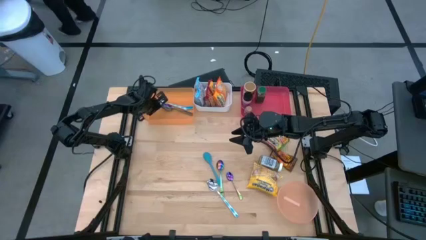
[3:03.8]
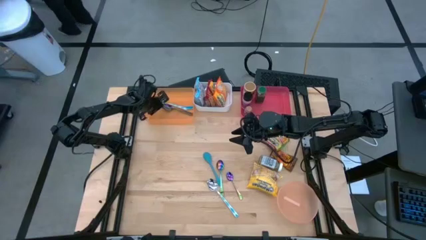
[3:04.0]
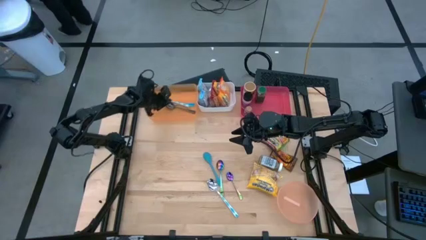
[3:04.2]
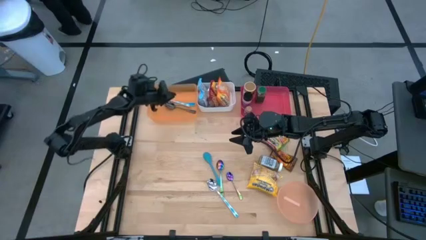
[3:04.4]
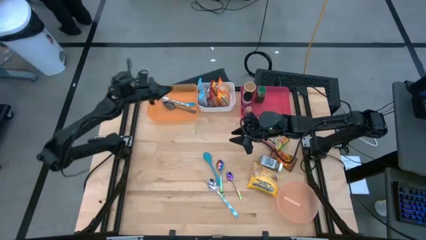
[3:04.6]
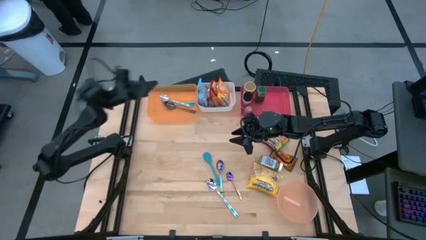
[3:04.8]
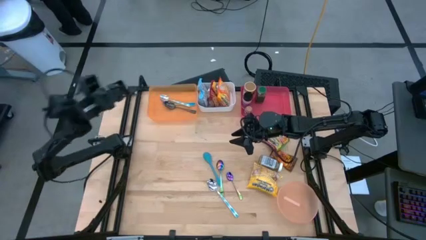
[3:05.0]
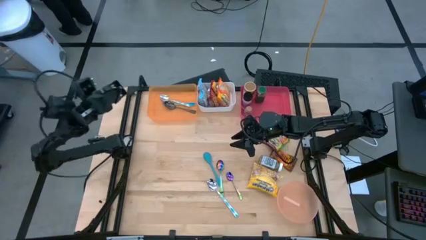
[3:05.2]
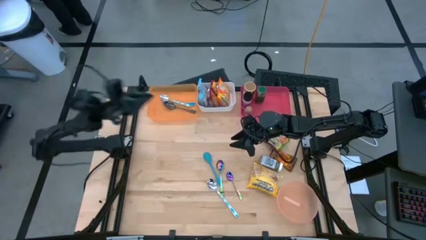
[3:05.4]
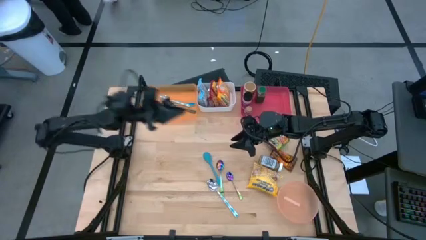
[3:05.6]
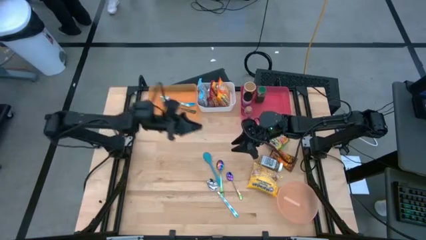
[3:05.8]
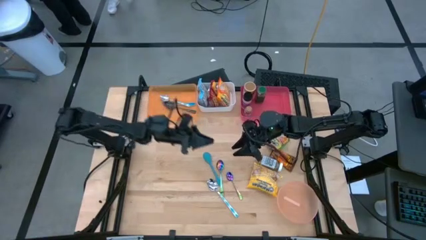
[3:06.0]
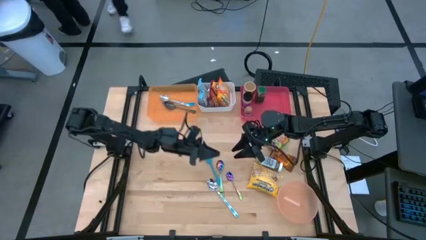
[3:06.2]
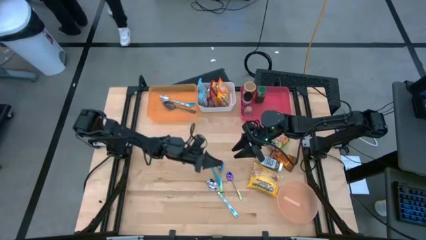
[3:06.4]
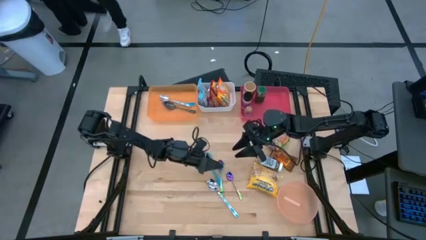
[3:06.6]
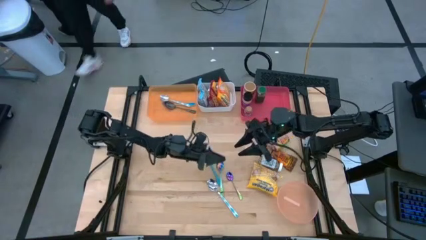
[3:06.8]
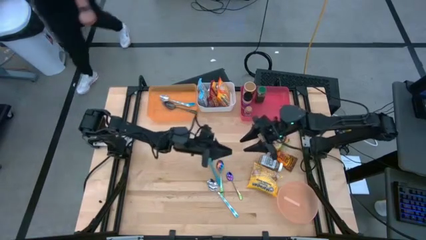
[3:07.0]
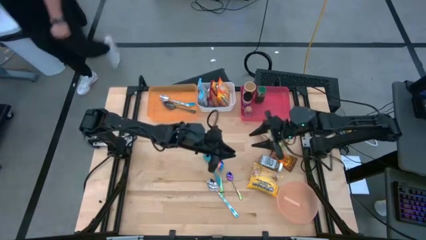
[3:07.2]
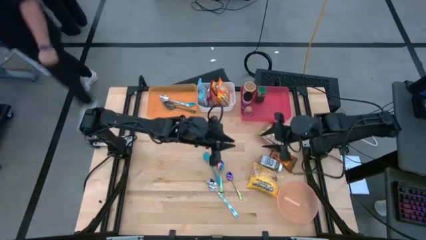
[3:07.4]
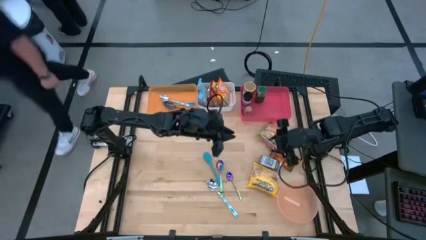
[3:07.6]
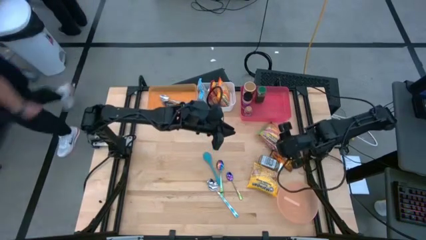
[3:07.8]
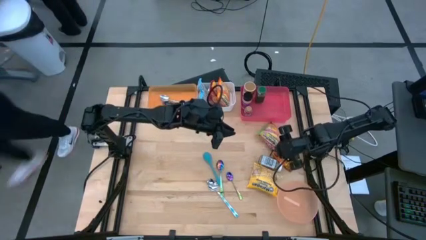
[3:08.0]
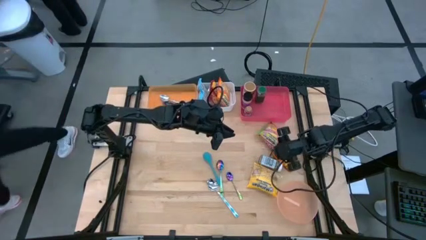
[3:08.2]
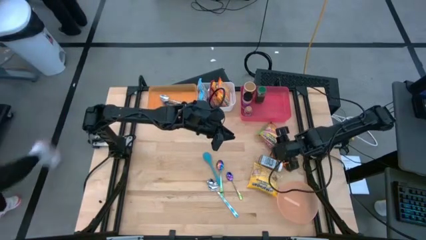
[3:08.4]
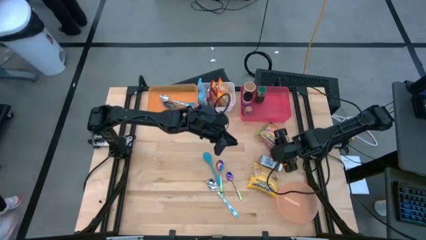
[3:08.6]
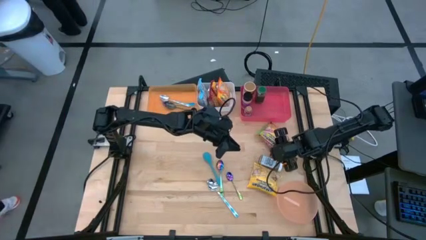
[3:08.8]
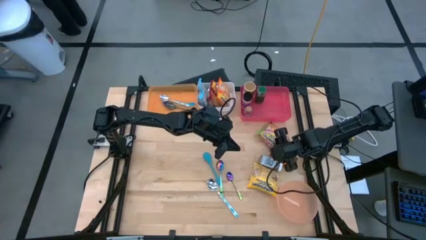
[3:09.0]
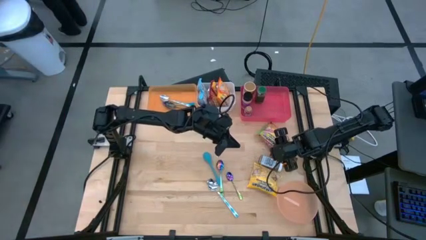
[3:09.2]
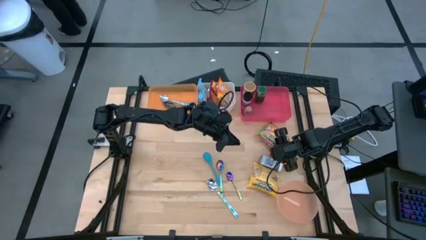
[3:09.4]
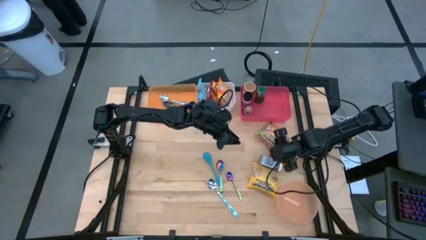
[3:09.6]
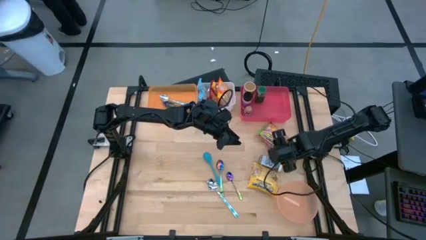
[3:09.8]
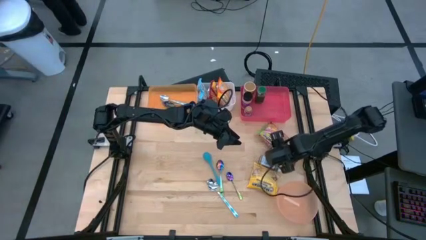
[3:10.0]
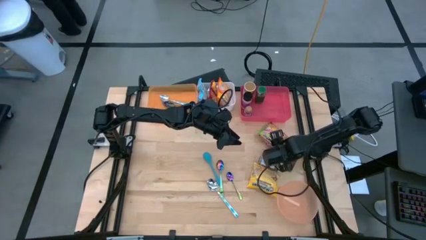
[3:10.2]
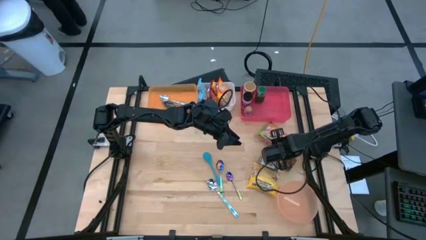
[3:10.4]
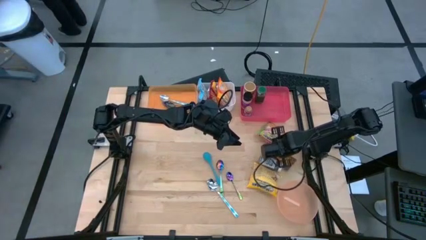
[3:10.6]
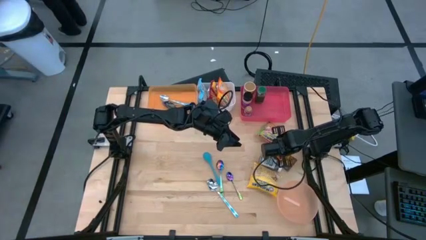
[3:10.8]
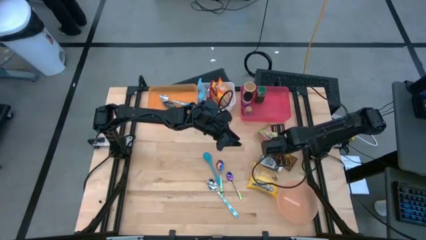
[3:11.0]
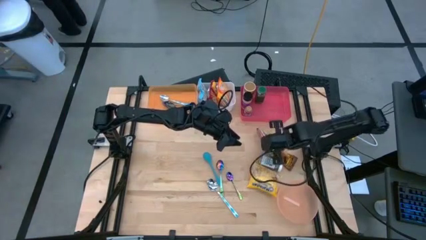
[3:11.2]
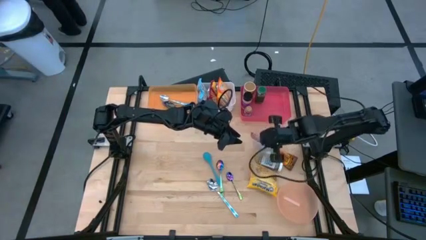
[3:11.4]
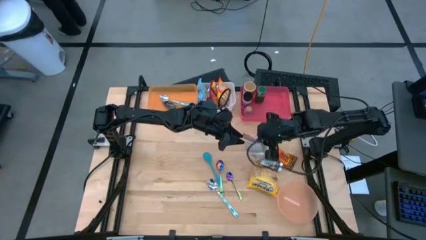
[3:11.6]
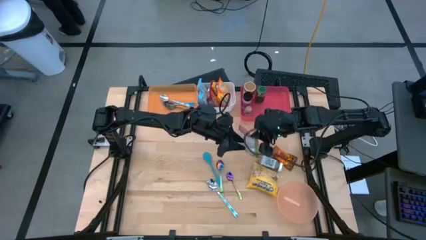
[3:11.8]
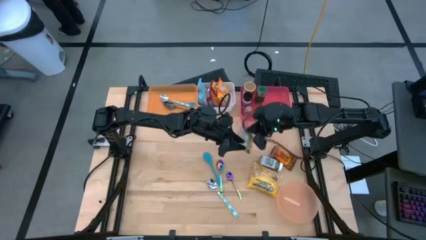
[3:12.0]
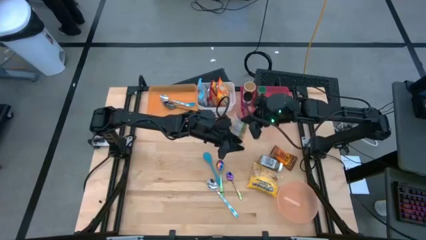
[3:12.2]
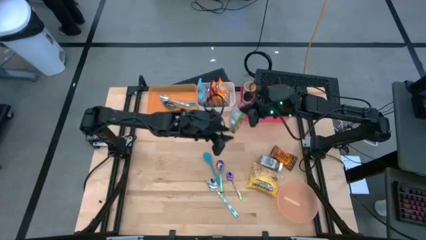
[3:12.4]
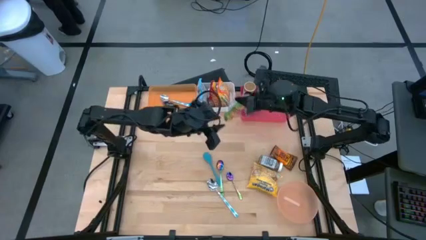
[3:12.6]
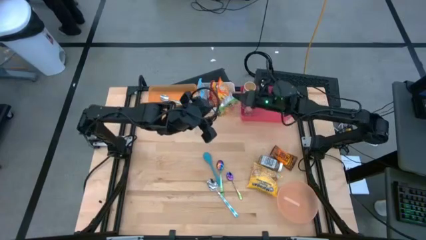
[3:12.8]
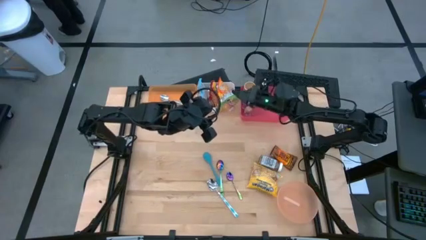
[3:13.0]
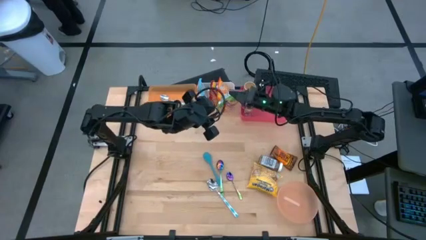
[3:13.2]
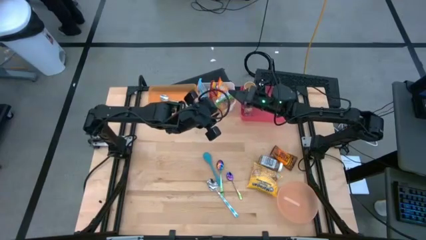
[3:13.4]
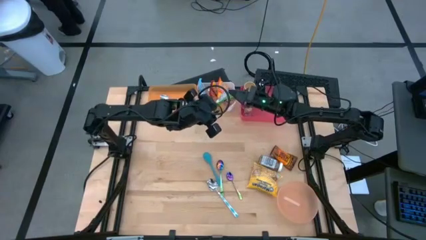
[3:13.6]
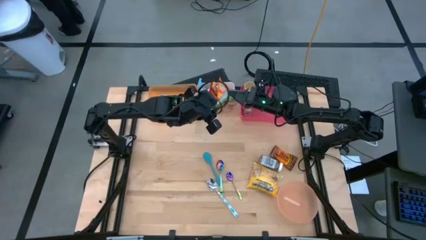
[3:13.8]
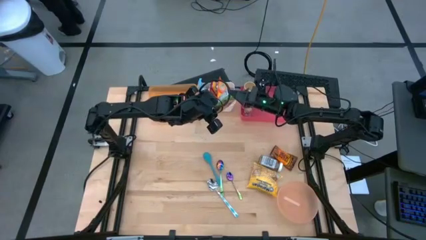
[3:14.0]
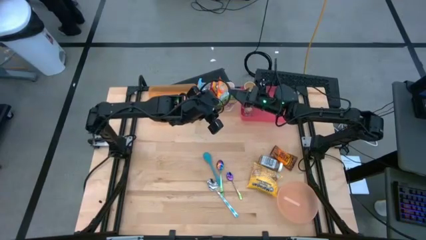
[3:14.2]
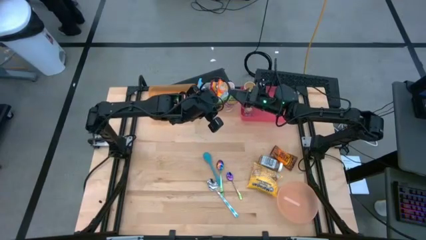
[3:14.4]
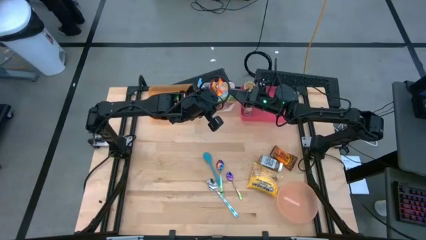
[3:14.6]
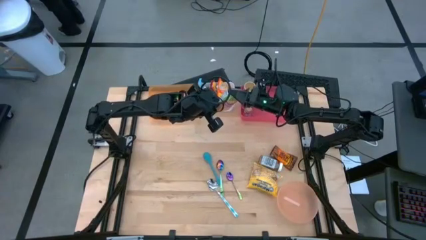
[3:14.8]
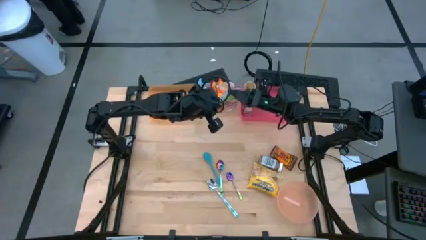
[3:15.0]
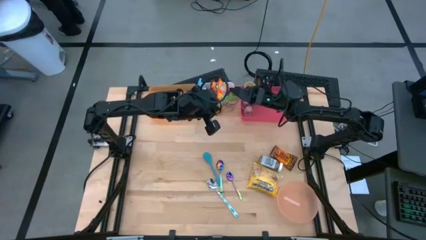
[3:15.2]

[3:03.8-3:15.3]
Task: Pick & Place Food Item
Put the green noodle pack into the white bin
